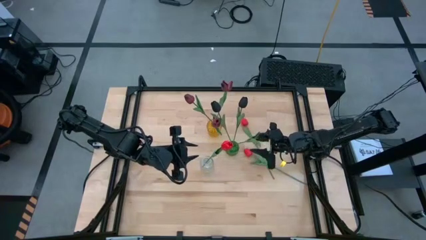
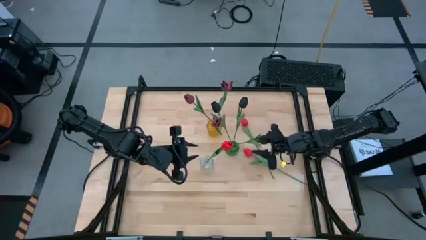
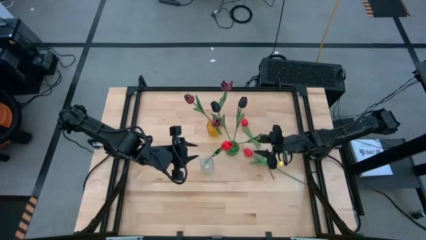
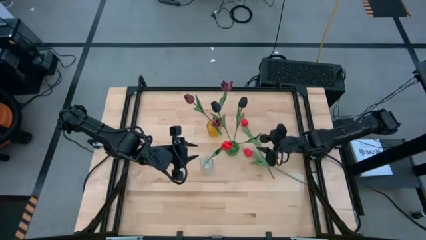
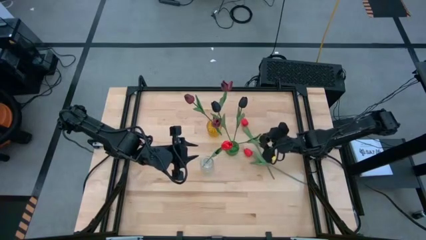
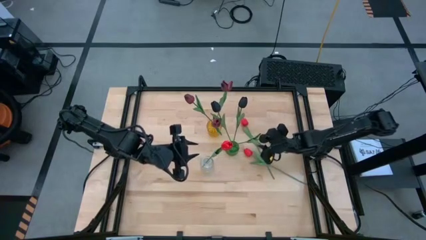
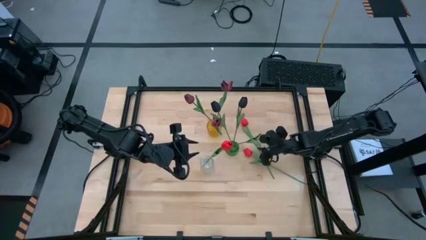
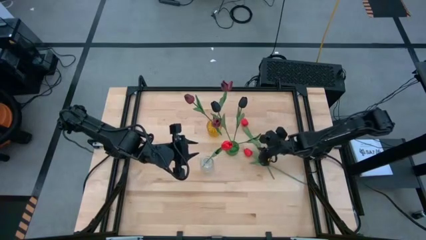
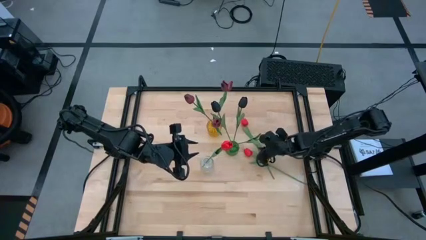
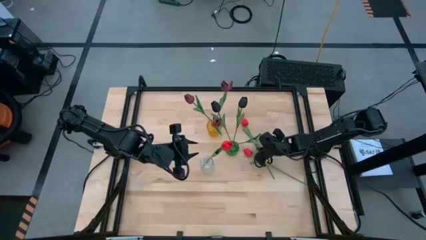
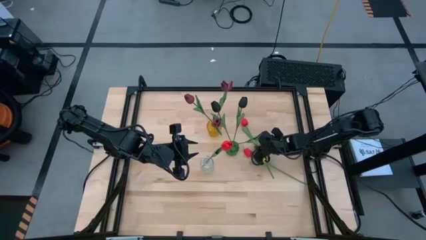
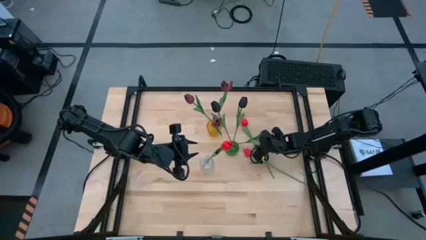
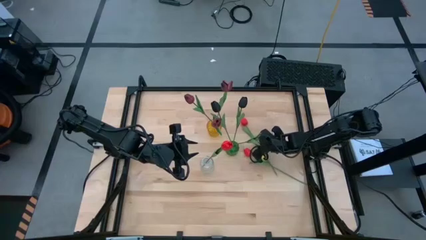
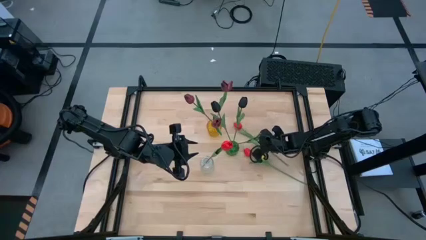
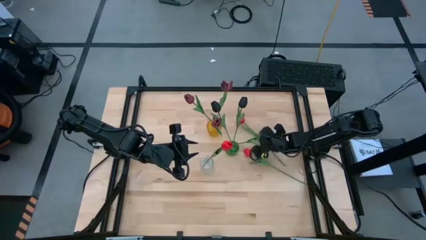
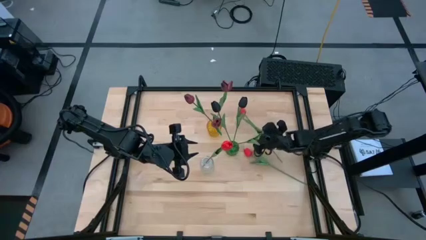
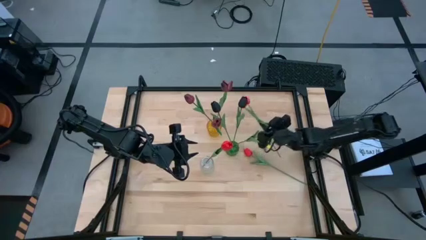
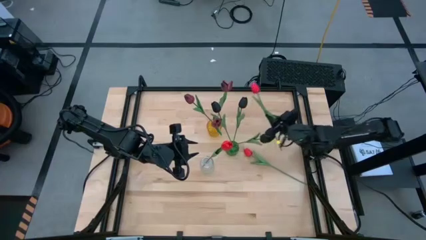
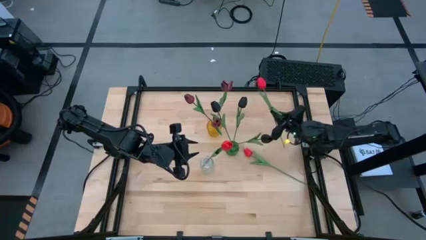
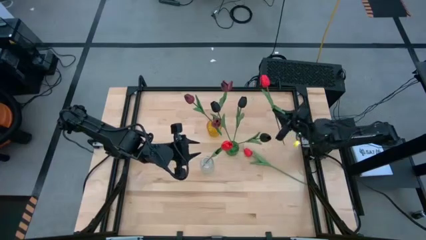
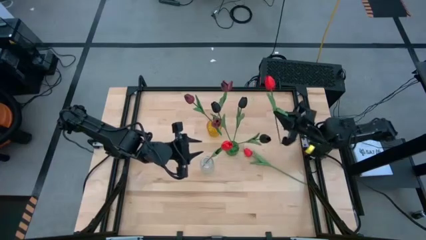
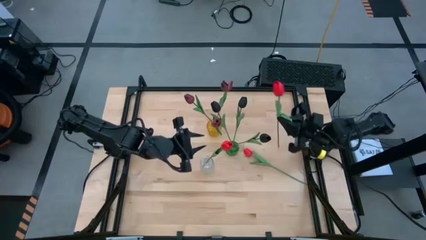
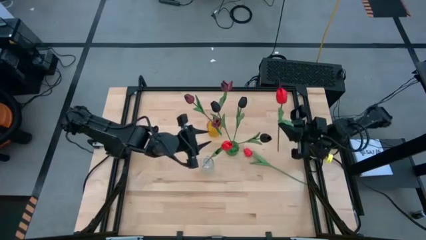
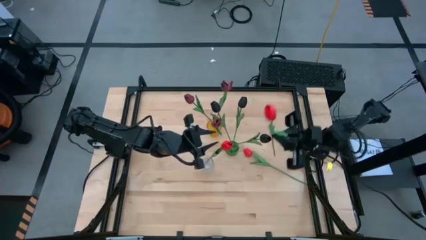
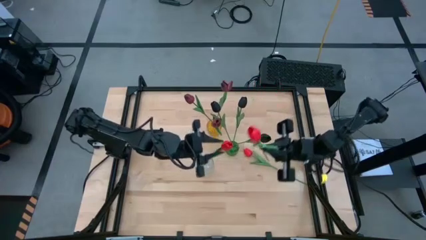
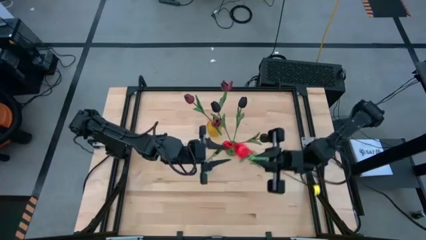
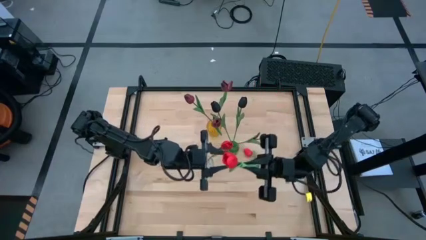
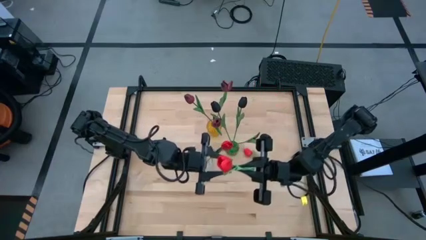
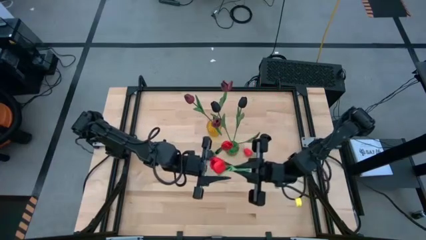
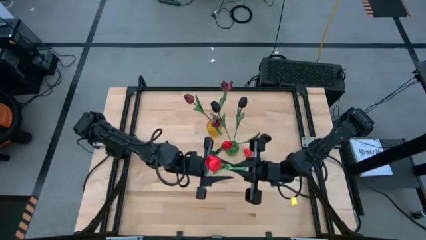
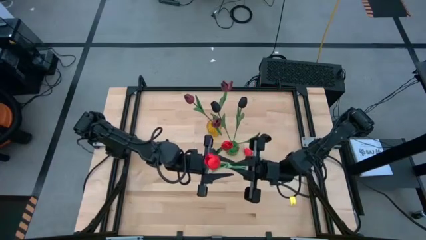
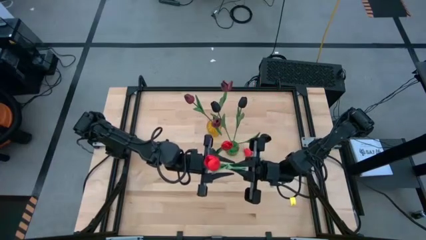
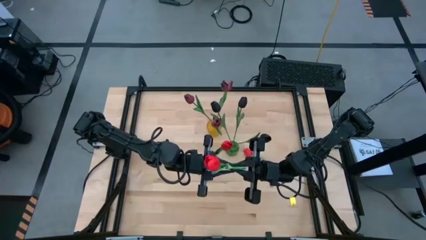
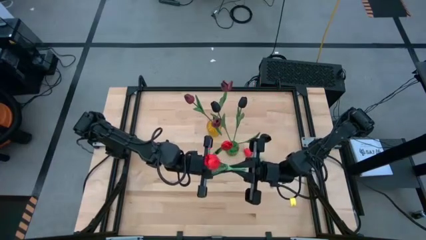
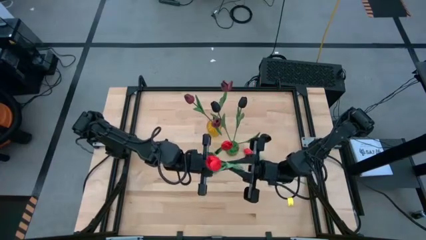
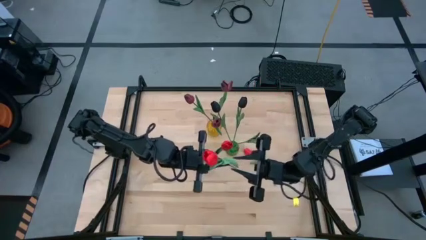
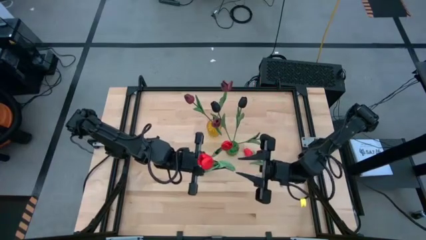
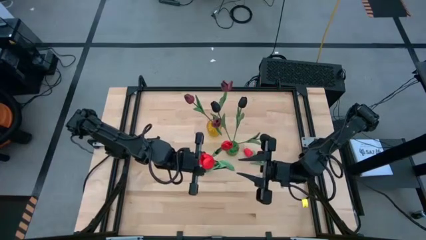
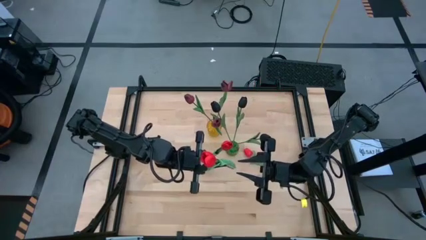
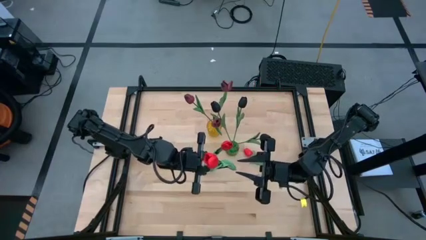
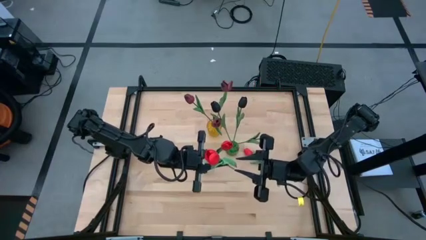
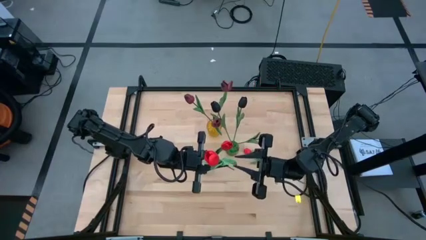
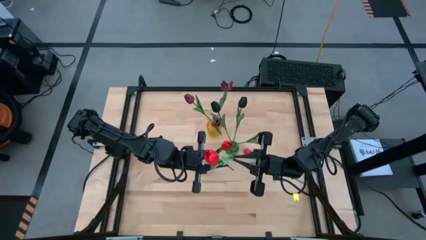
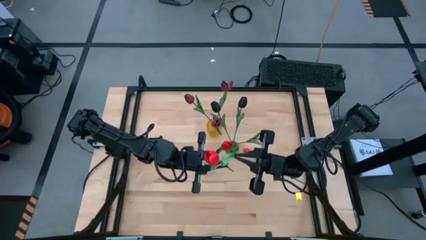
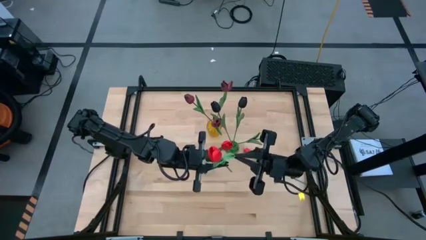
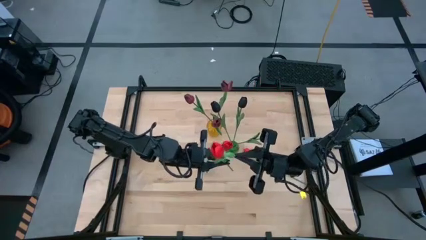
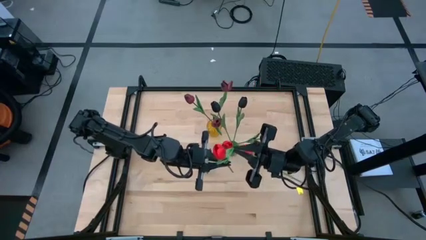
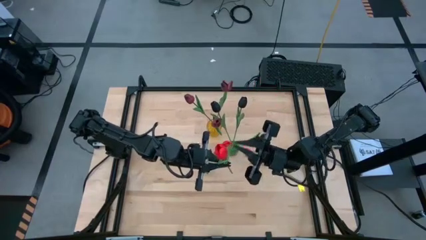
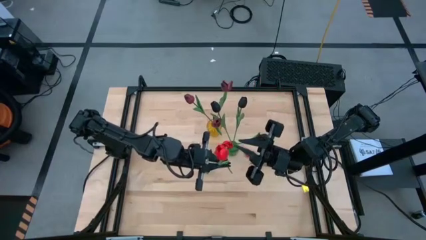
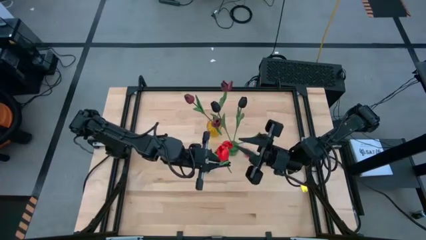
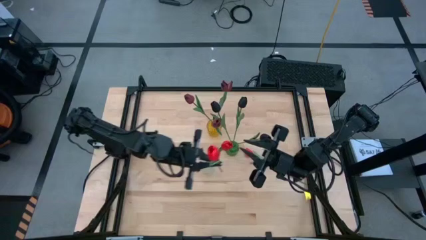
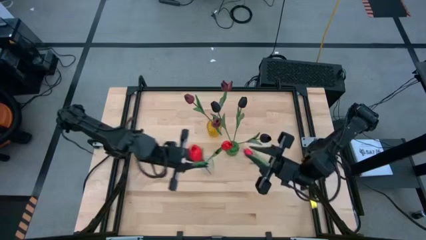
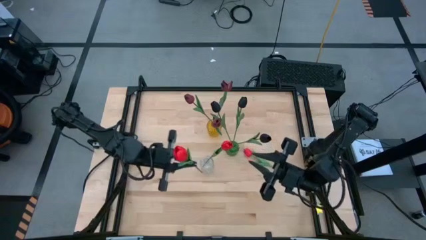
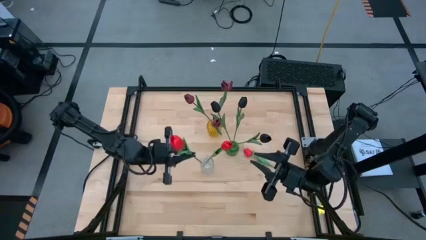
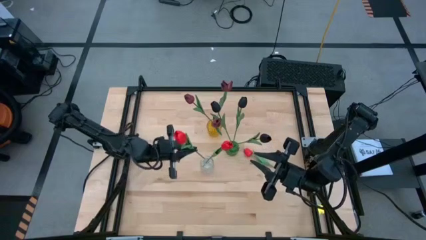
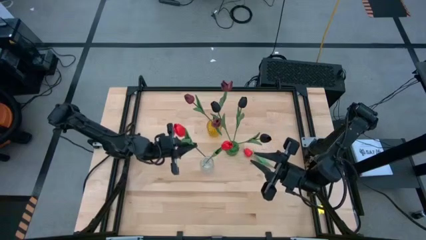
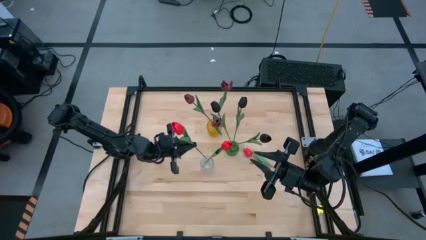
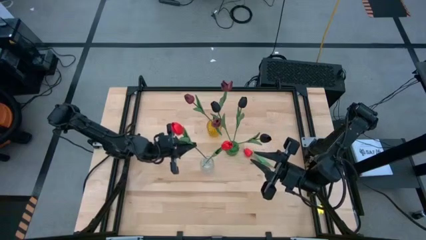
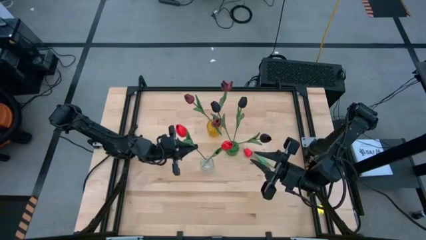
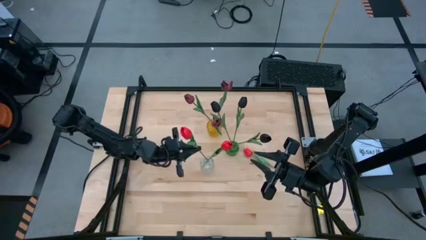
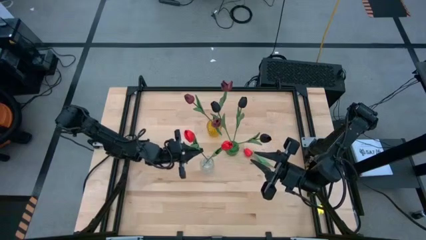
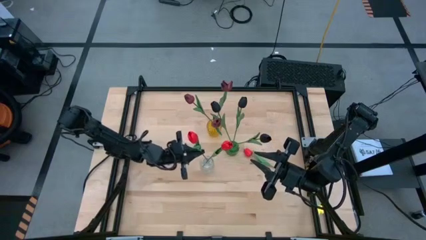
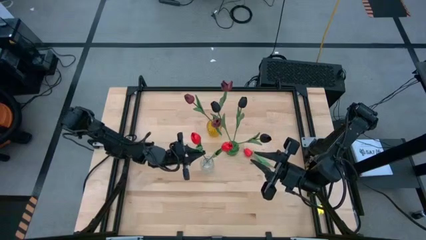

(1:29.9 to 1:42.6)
Task: Sort flowers into vase by color
Put the top orange flower in the transparent flower vase
